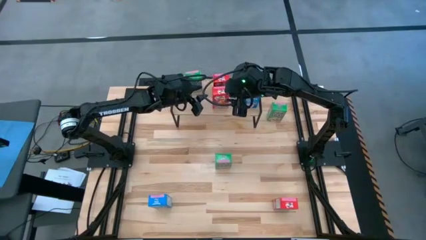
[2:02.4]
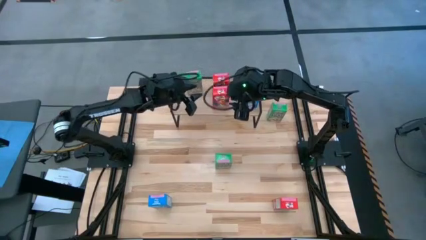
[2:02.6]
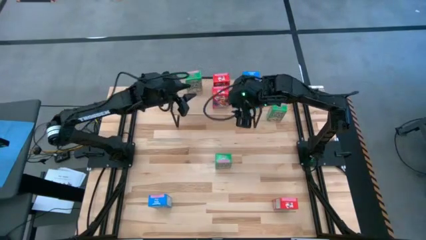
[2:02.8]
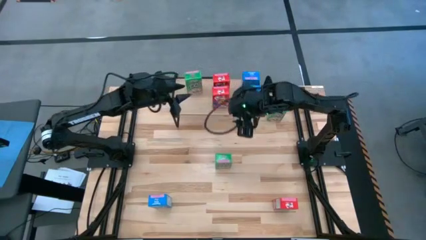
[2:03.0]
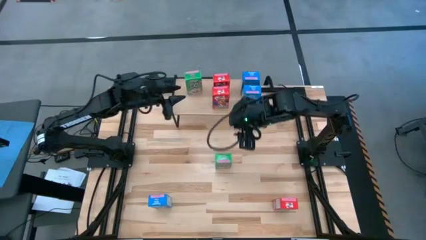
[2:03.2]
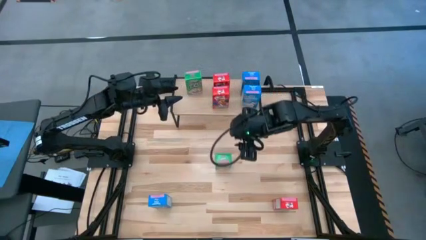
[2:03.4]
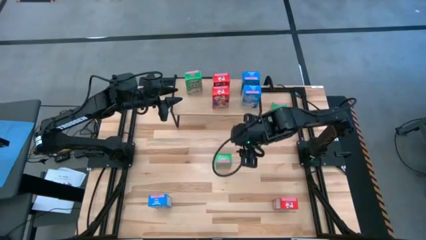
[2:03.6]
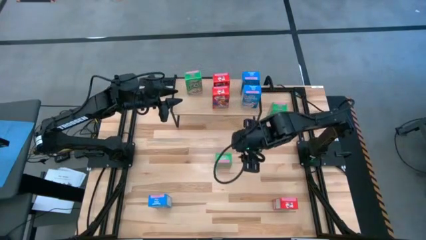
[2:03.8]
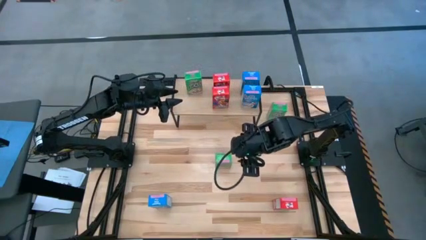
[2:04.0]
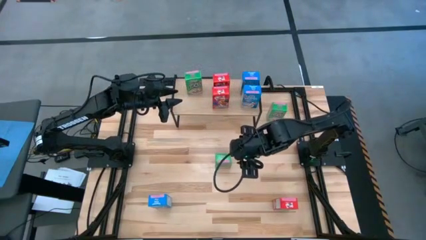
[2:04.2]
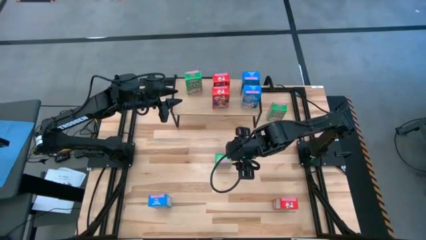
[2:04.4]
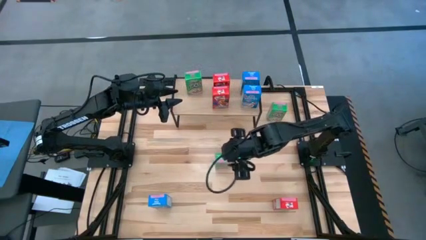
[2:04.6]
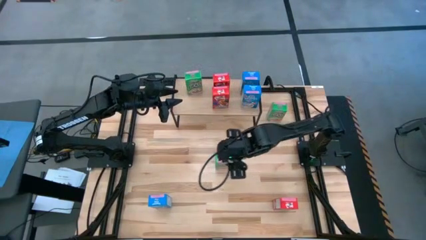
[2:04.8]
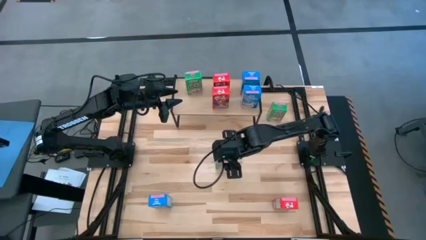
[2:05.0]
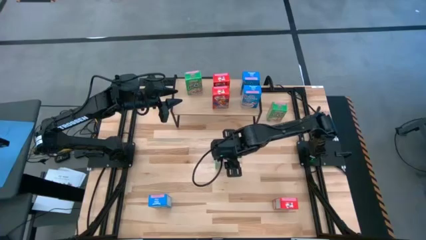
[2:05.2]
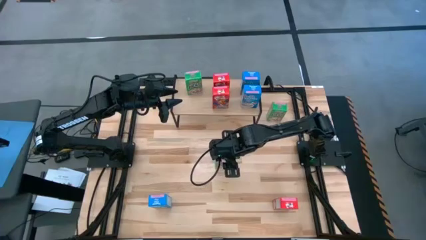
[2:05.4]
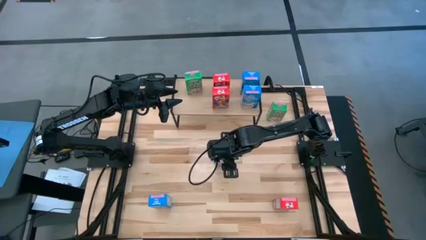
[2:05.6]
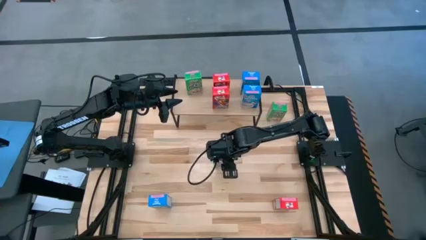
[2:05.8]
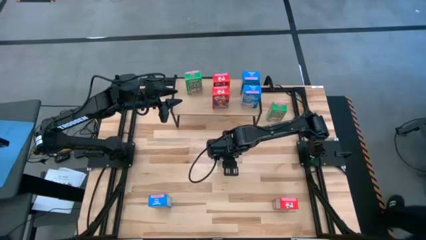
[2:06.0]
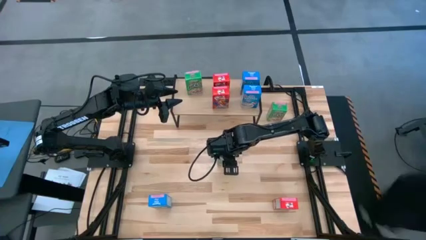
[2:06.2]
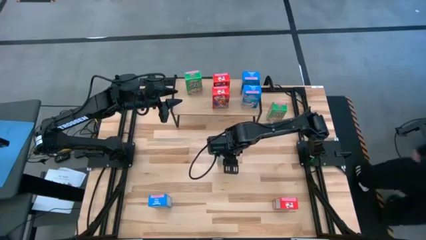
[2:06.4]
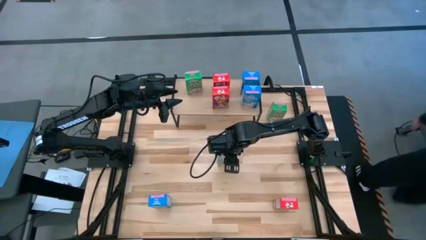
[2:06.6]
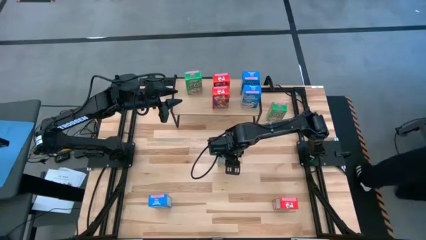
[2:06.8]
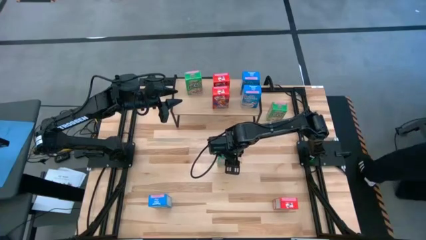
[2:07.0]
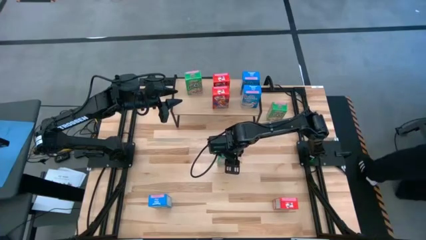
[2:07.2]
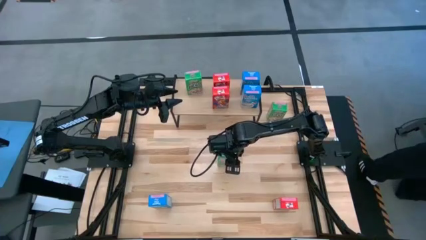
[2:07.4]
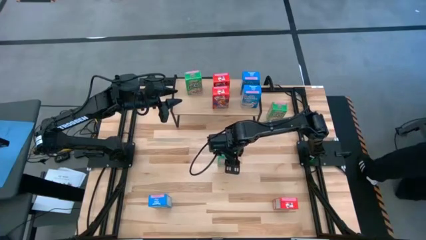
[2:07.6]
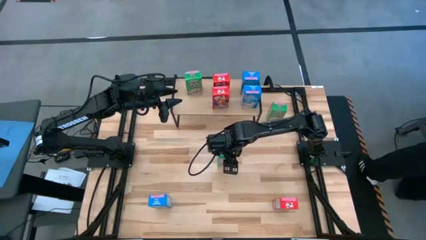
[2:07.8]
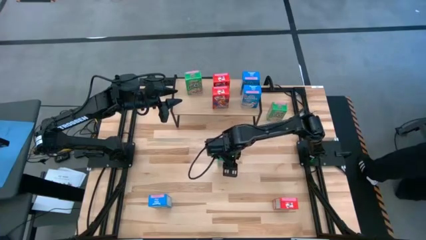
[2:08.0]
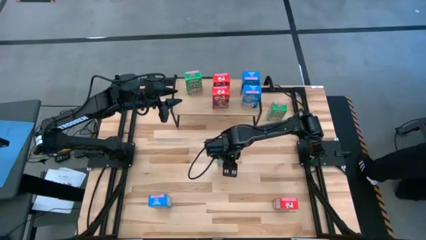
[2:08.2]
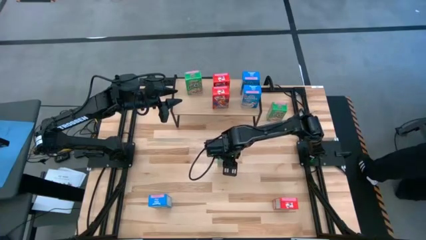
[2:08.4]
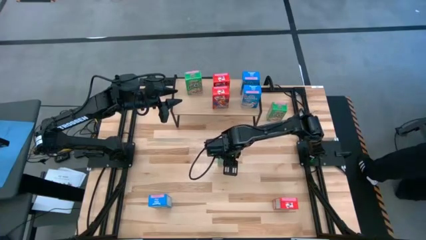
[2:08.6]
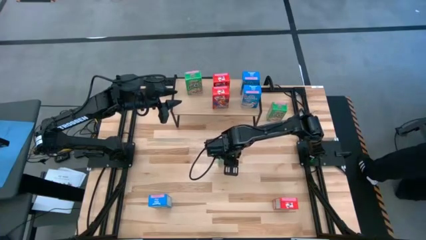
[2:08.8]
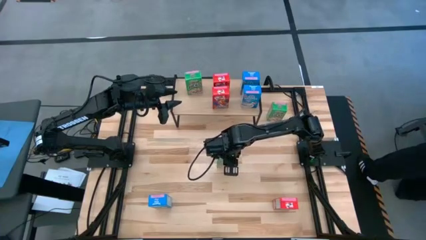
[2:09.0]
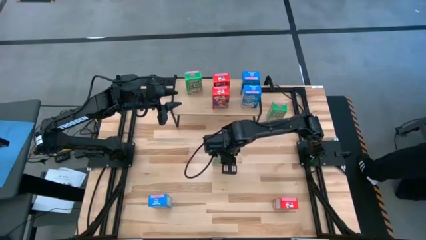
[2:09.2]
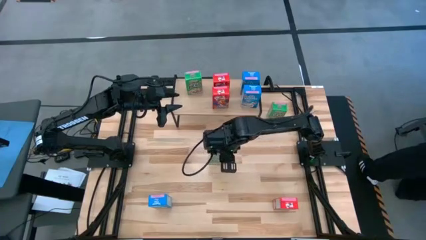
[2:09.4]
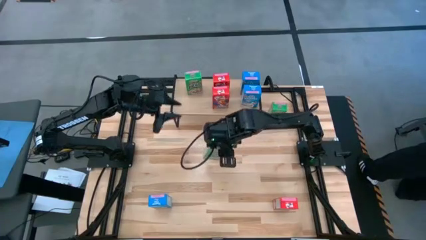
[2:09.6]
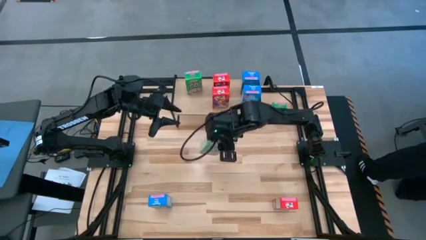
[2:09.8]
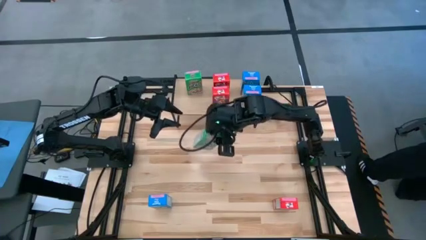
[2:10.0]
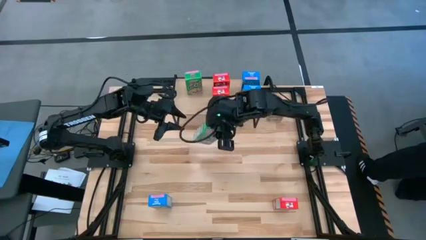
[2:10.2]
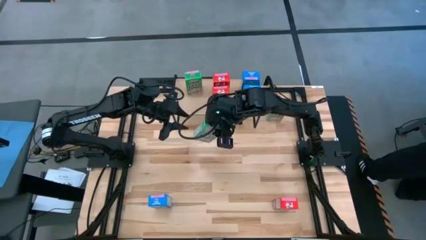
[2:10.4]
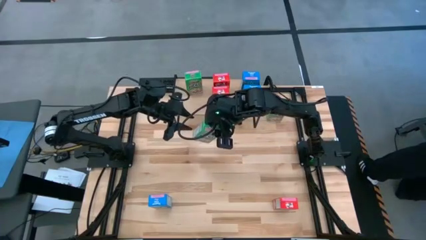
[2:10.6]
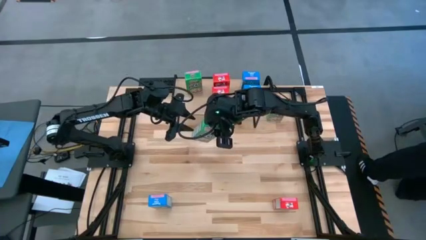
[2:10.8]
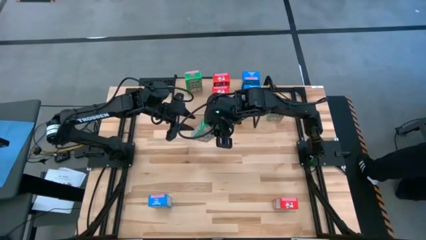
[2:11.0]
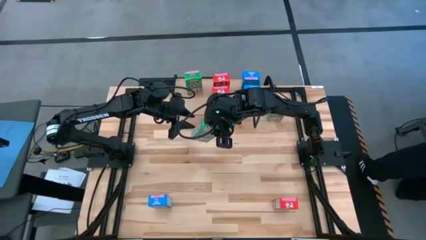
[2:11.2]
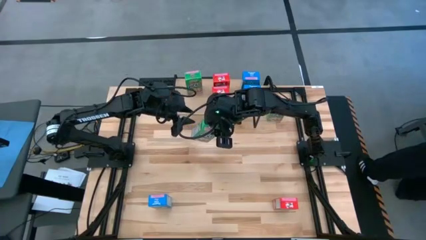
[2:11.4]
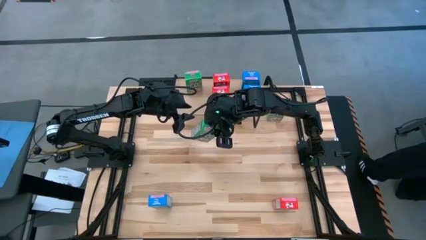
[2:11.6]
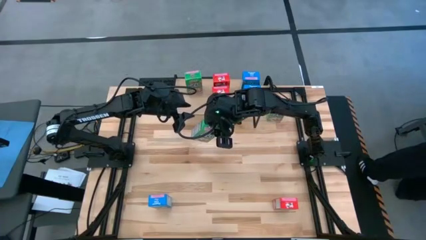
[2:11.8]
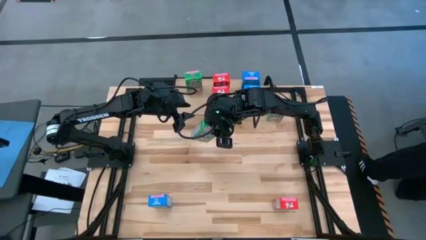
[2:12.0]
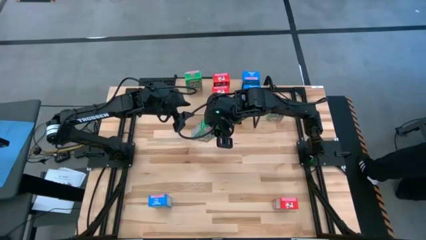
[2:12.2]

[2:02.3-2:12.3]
Task: Stack cereal on shelf
Put the bottom green cereal box on the shelf aligned with the other green cereal box

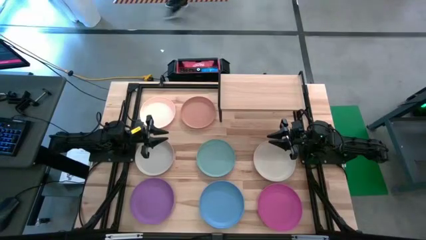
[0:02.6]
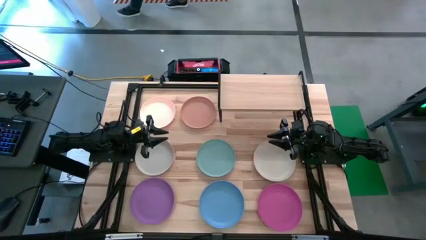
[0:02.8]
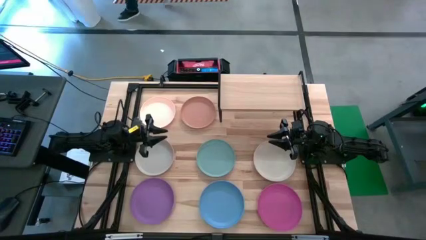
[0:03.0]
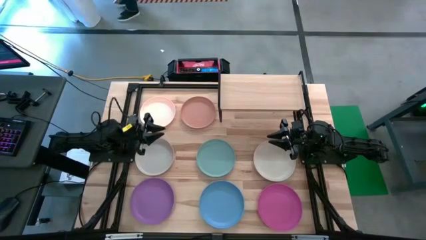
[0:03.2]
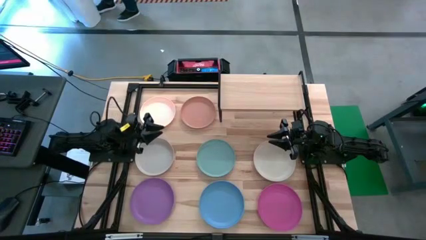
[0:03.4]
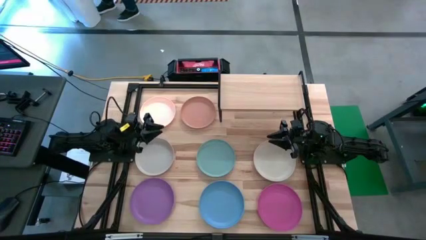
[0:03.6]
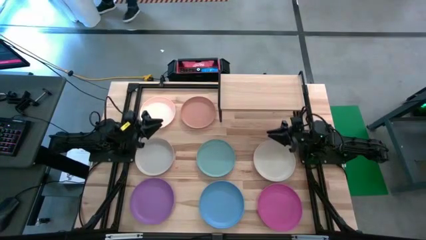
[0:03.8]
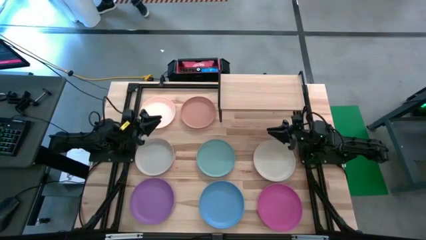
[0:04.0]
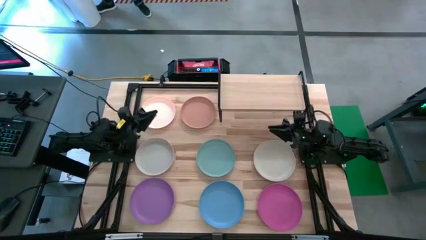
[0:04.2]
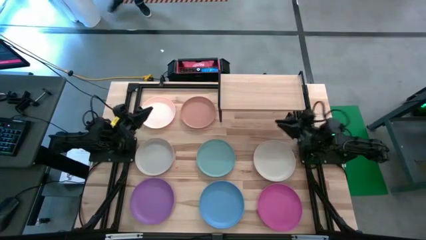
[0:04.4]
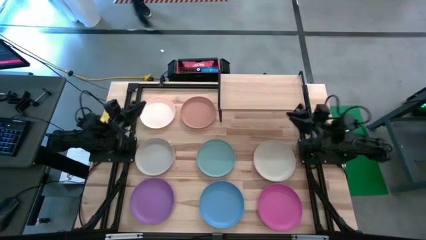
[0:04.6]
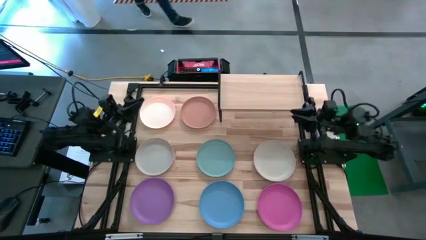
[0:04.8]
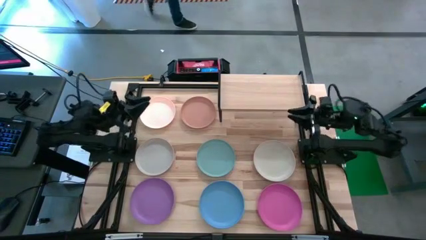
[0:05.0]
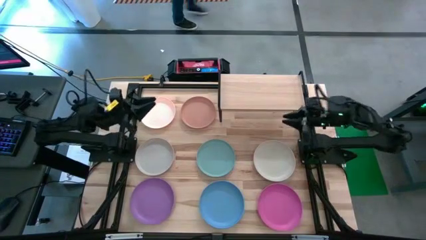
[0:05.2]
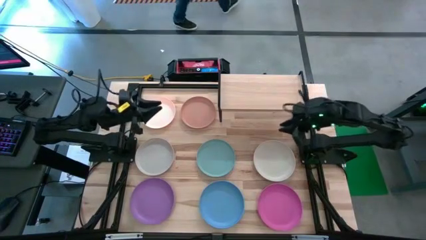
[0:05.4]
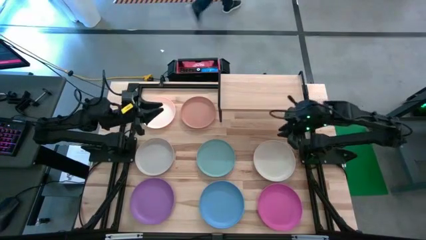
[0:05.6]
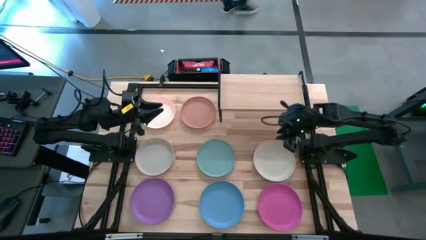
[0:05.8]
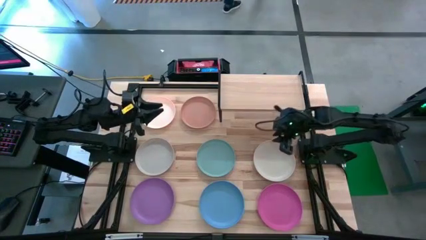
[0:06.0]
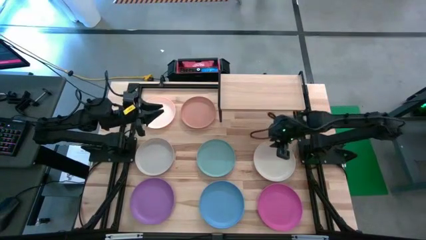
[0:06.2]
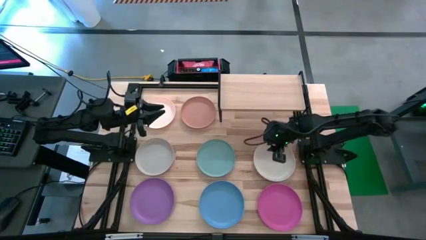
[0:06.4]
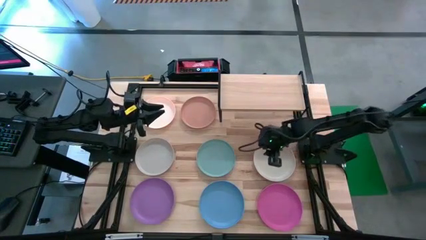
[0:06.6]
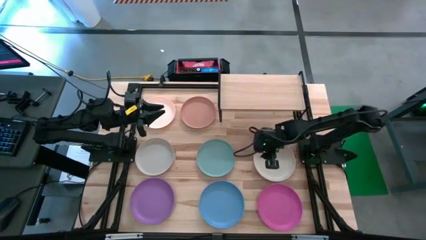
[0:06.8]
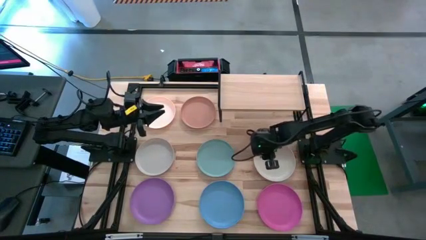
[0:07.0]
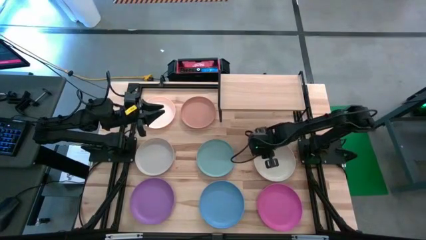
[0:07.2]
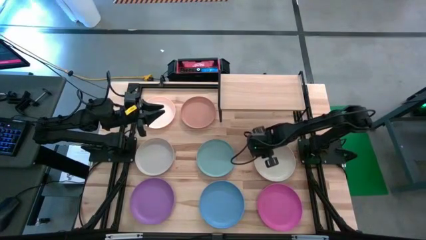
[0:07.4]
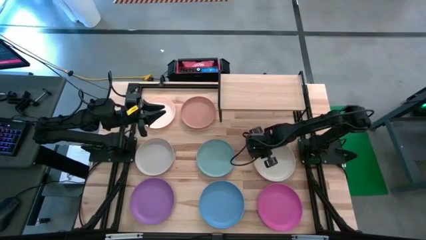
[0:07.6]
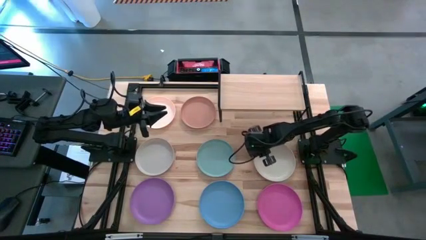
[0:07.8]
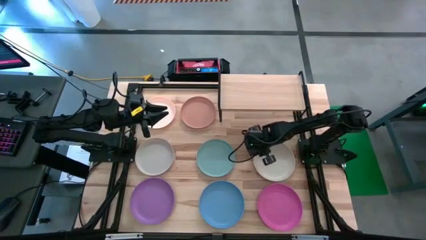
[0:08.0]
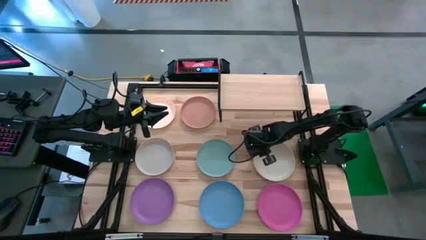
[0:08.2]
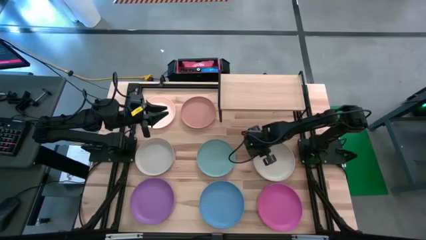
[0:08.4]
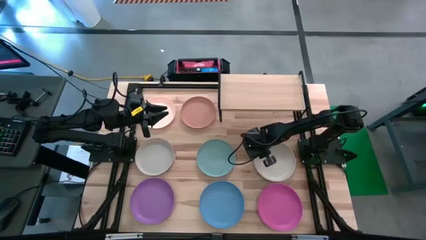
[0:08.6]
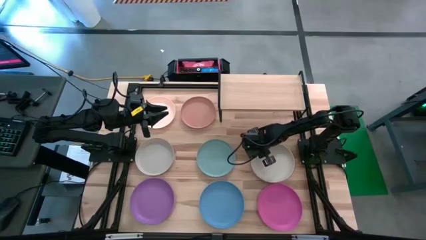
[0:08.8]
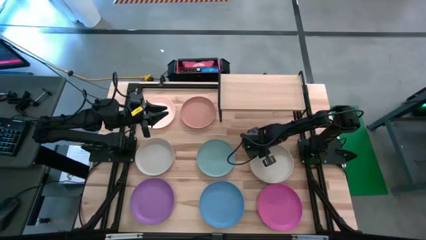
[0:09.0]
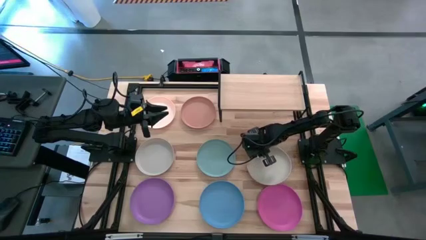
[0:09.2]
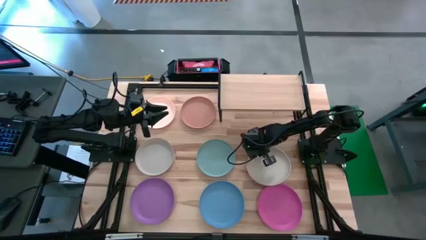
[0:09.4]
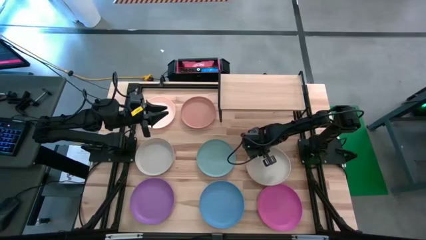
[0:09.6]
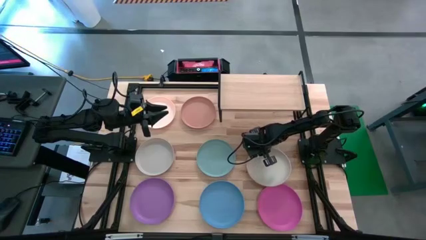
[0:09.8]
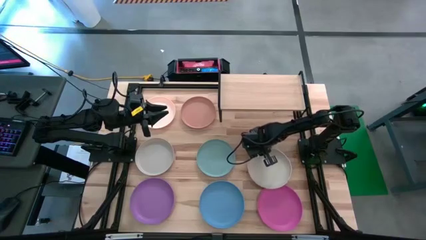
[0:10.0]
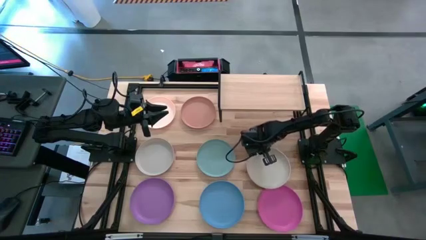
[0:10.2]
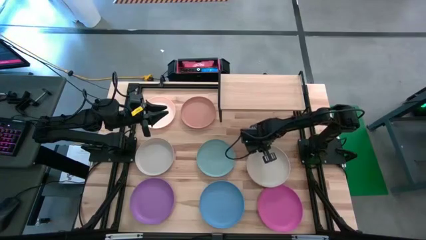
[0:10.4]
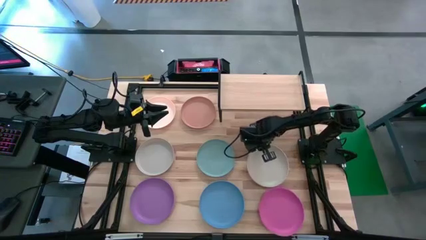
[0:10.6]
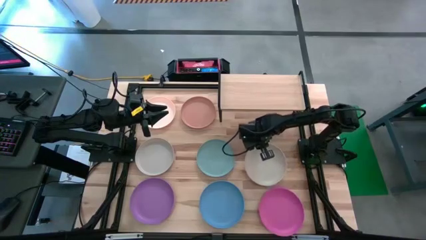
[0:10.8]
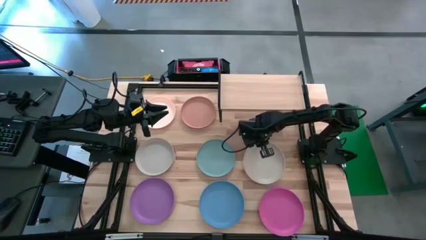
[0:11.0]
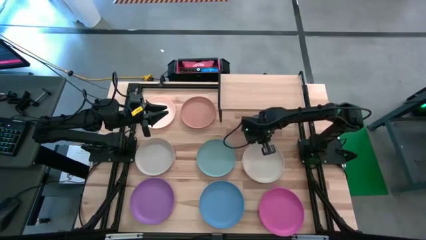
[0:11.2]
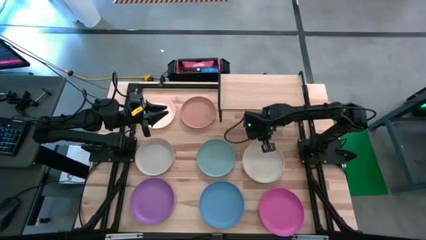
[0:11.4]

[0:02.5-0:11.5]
Task: Place and stack plates onto a shelf
Put the beige plate on the shelf
